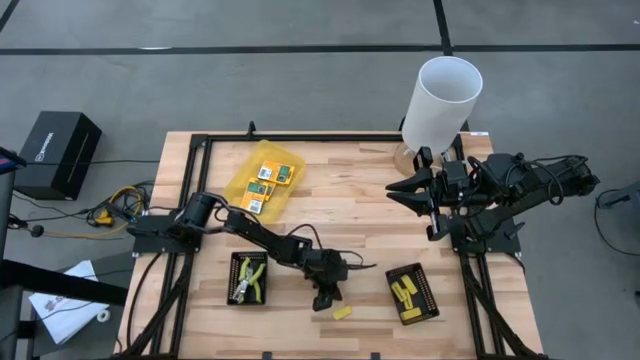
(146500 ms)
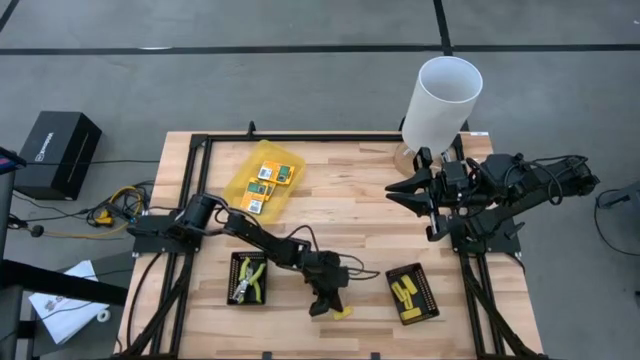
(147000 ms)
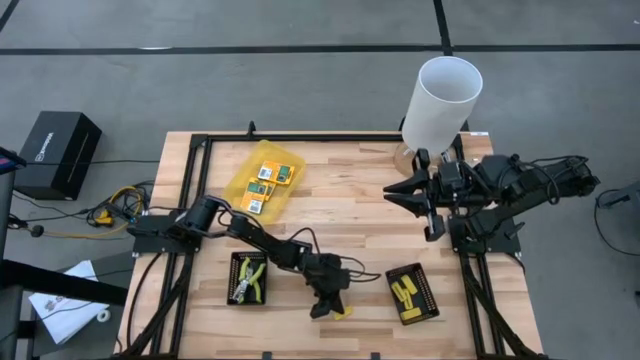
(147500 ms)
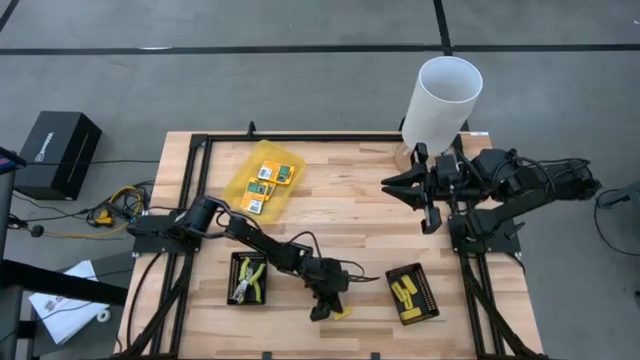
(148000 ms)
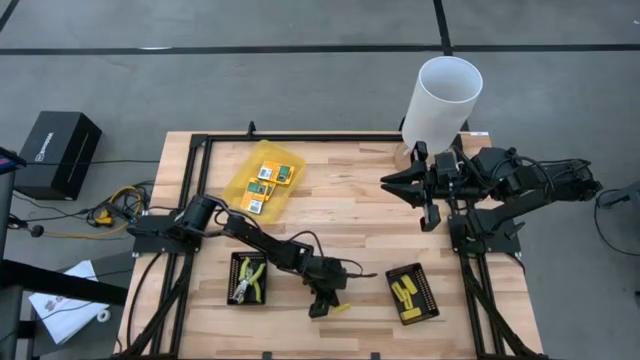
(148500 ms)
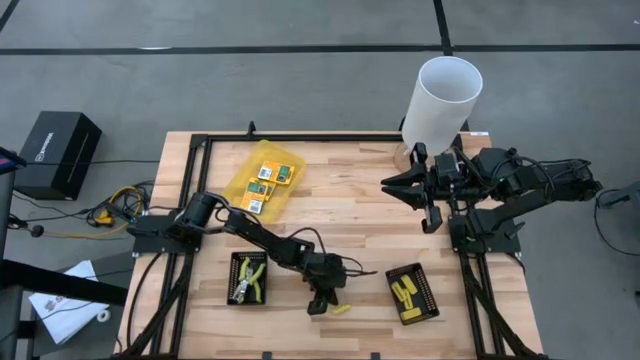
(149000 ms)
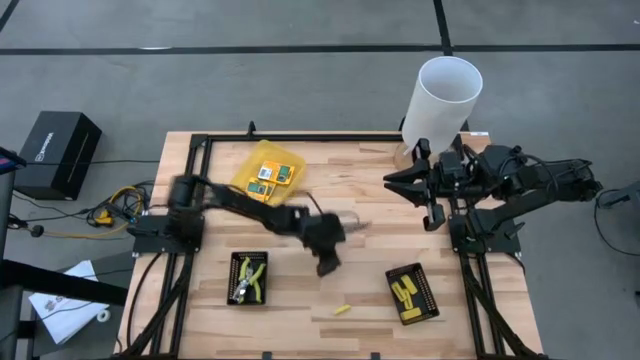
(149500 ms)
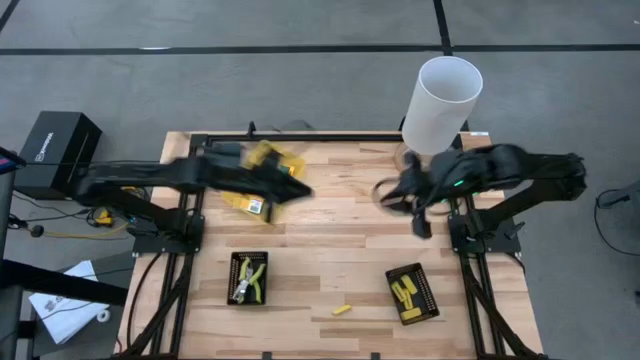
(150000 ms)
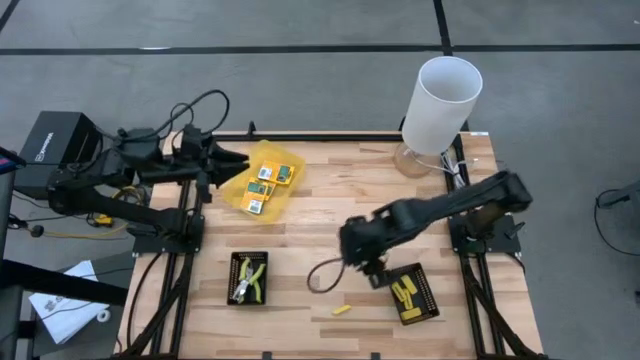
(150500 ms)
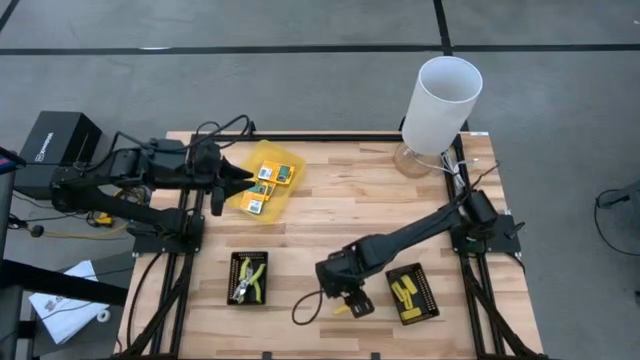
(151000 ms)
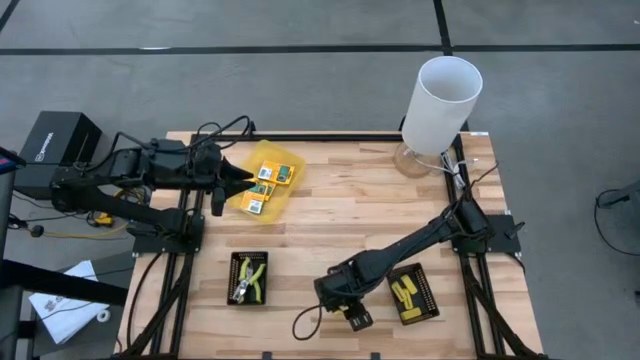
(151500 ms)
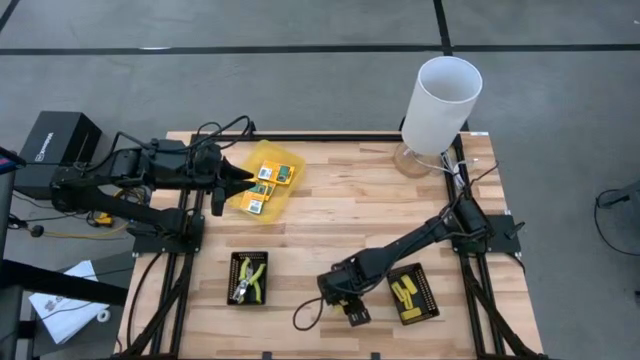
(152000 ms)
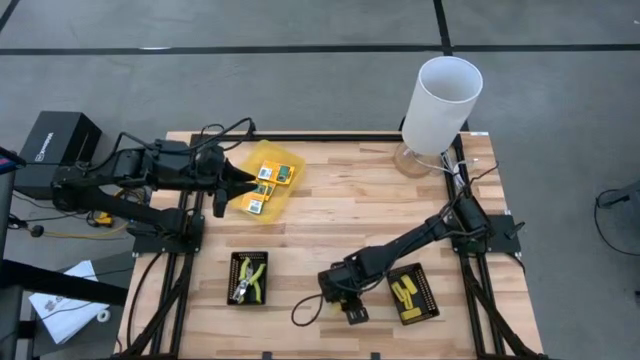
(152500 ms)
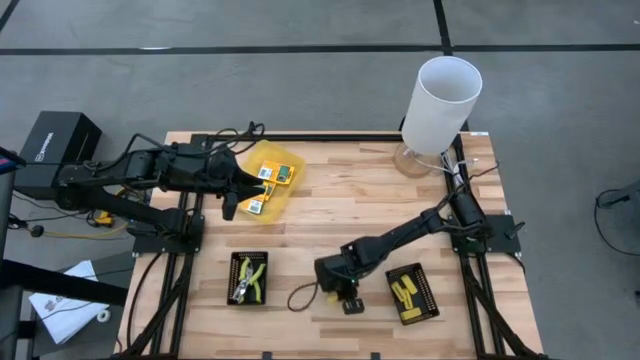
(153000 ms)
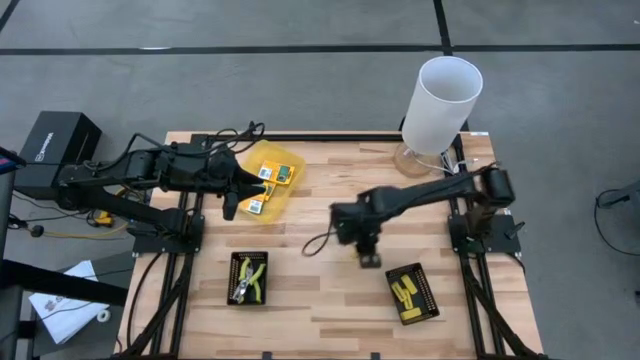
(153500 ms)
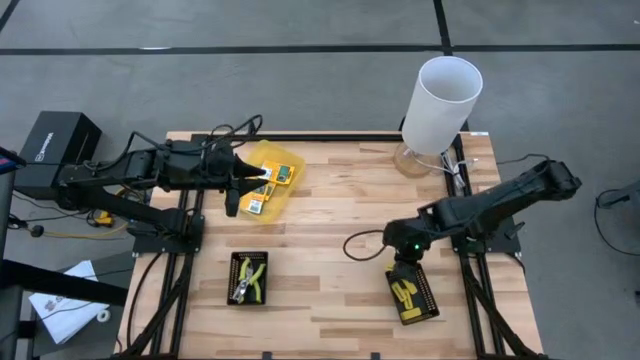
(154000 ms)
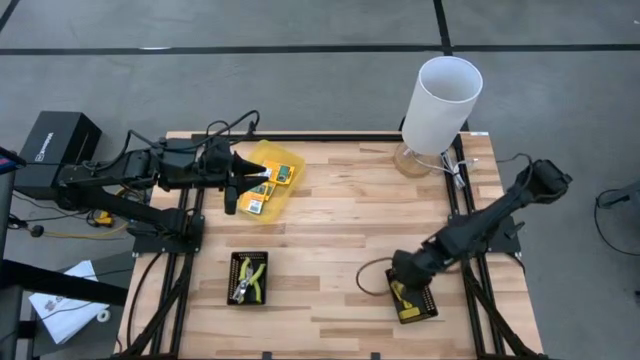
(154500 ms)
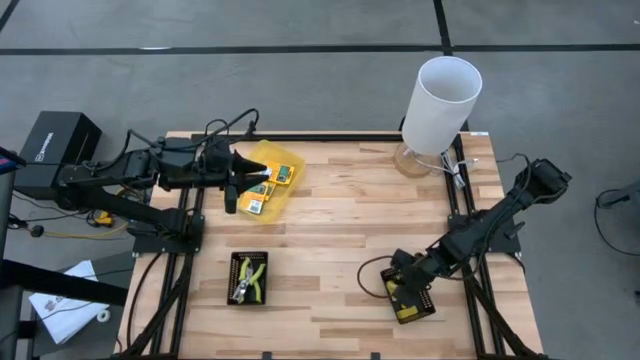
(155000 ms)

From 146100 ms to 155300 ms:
Task: Pick & Place School Supplies
Put the yellow eraser into the right black bin

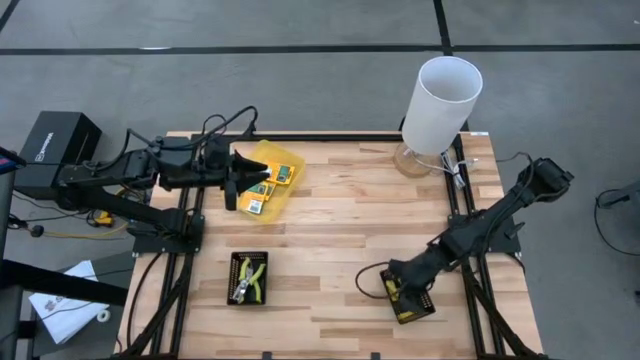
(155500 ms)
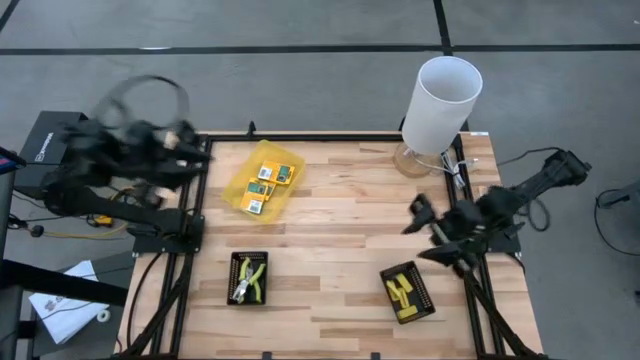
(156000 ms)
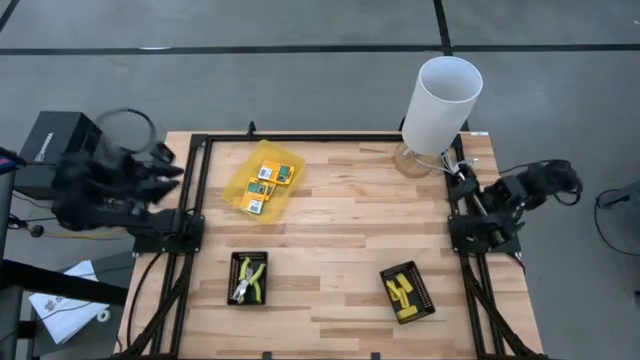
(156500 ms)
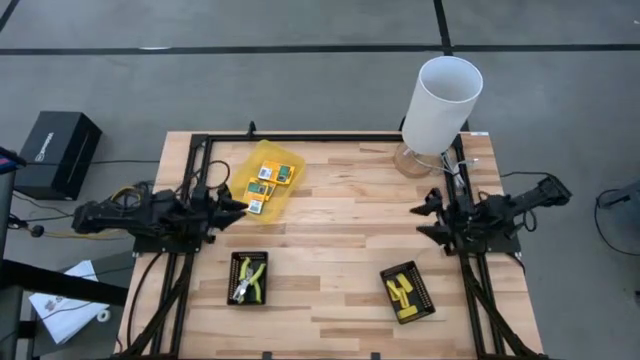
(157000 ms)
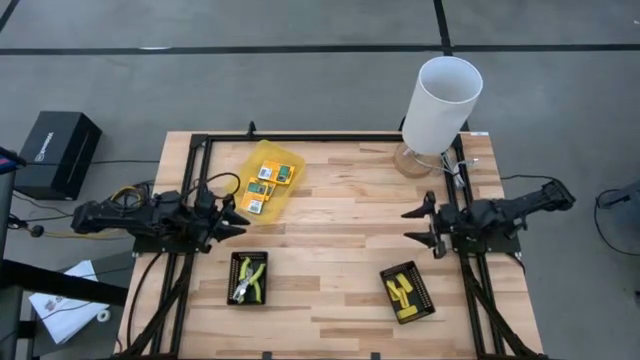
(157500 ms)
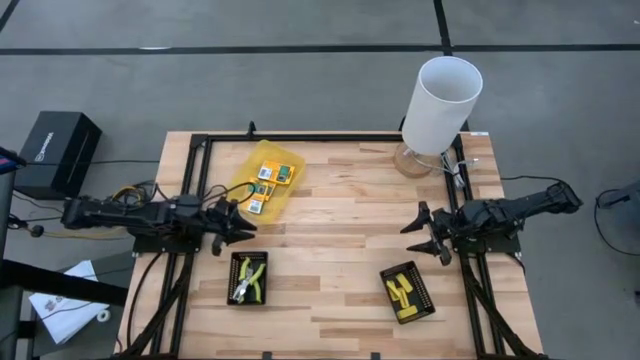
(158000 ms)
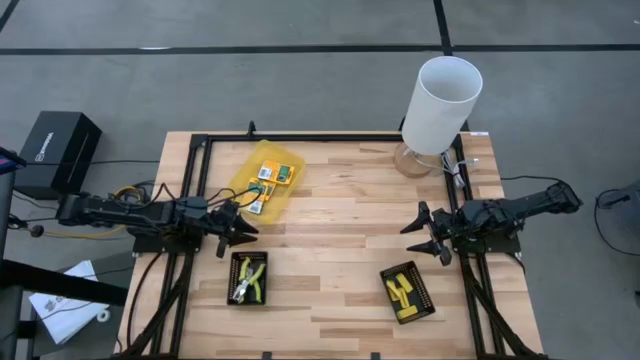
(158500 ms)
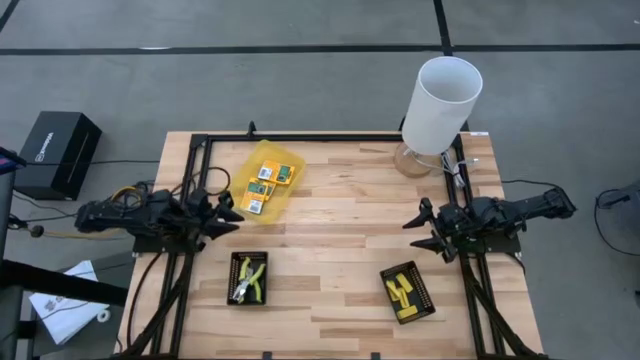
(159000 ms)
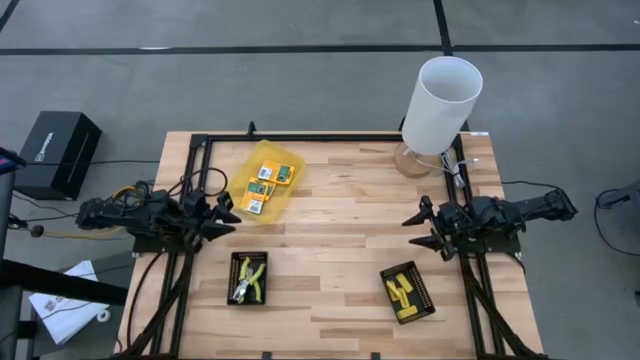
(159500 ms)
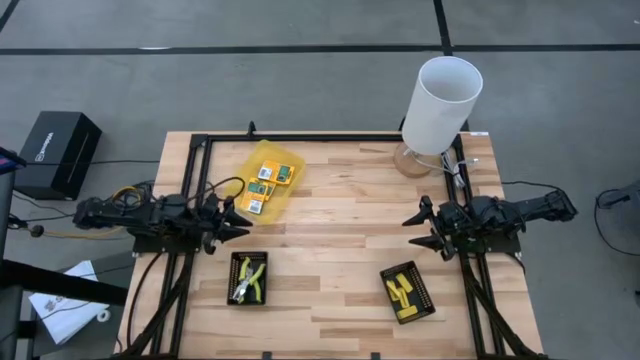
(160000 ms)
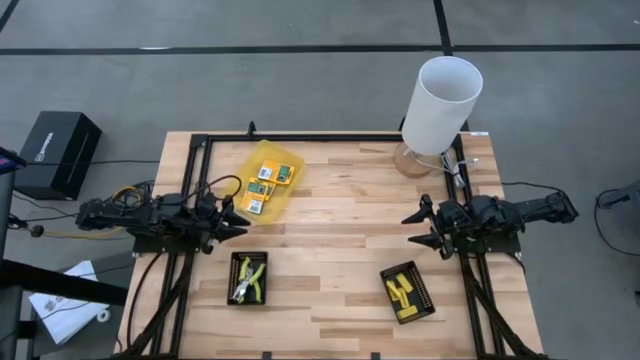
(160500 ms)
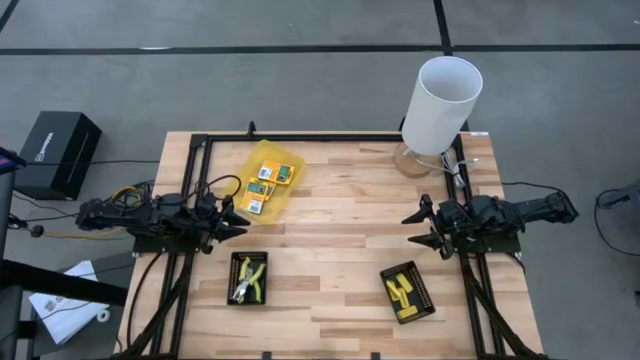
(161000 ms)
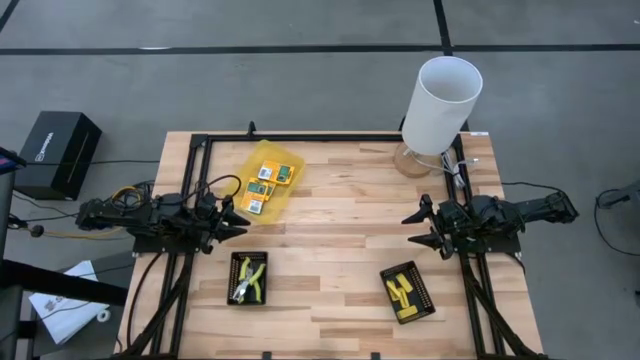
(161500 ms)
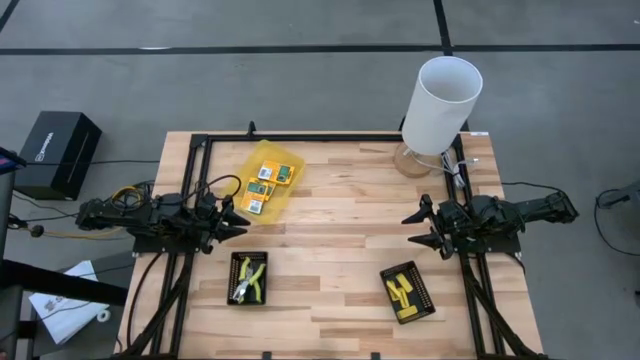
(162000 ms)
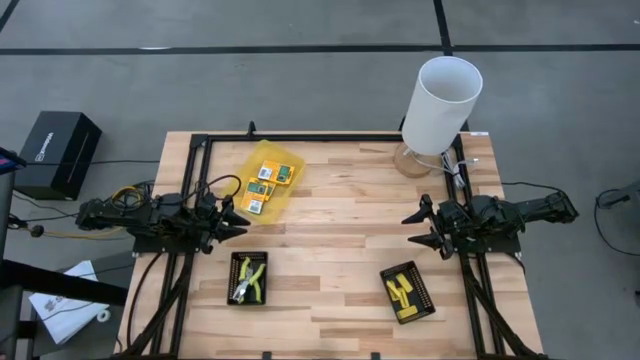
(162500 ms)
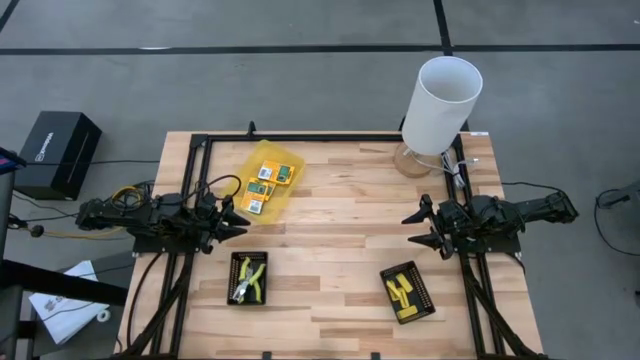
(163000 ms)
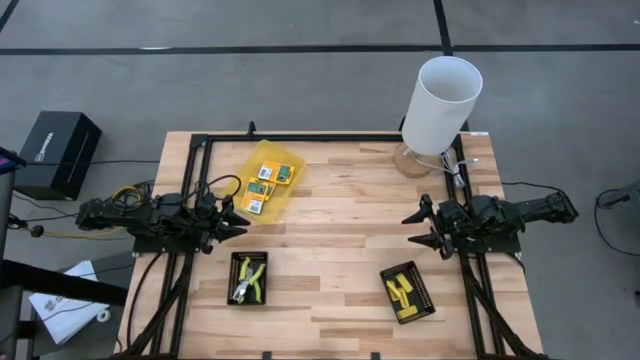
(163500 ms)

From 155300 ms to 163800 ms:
Return to Home Position

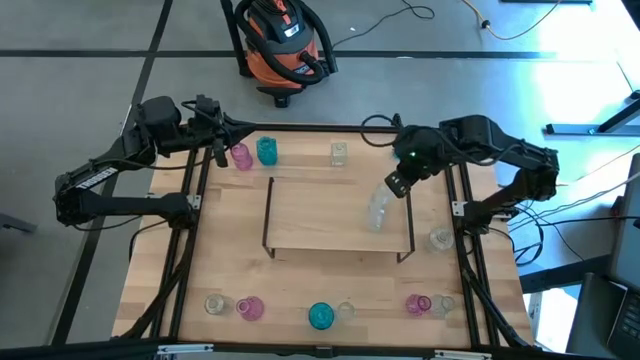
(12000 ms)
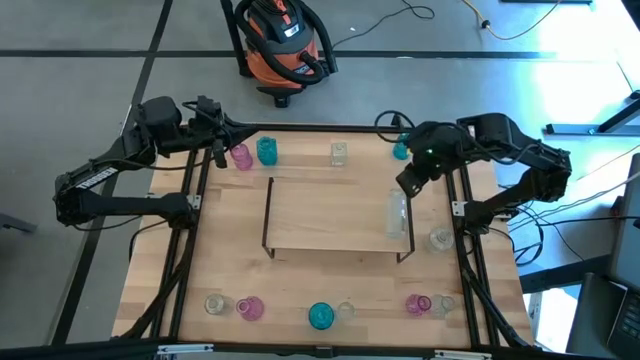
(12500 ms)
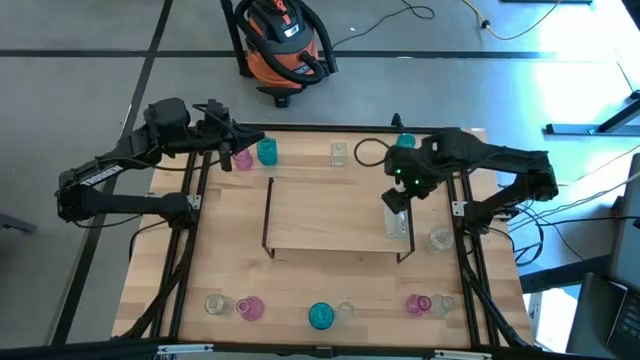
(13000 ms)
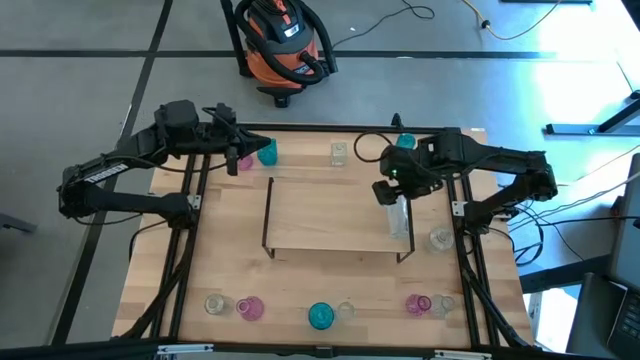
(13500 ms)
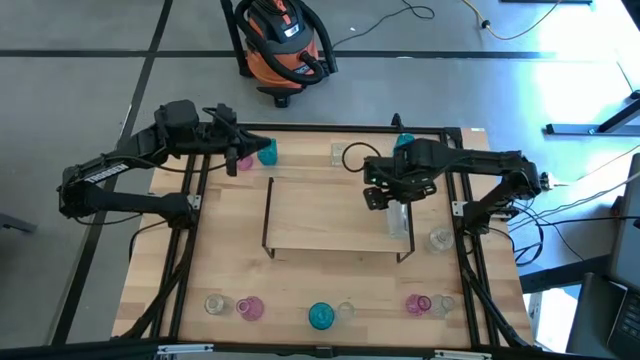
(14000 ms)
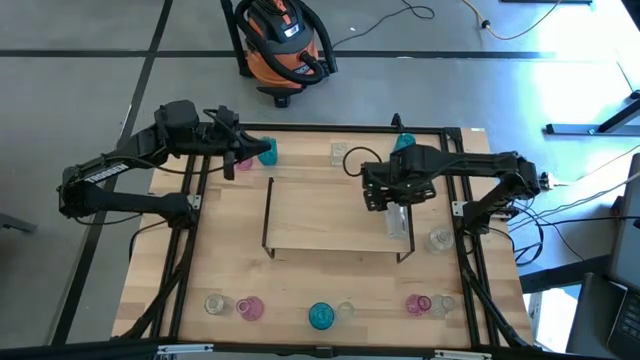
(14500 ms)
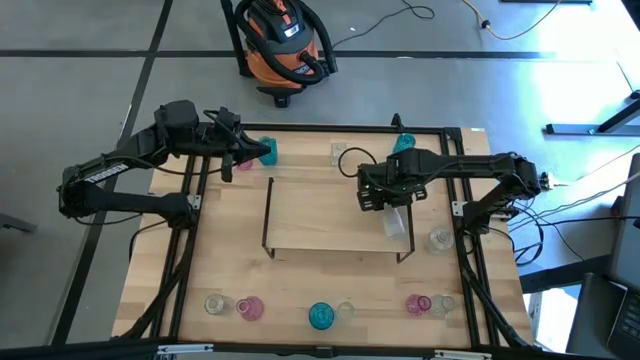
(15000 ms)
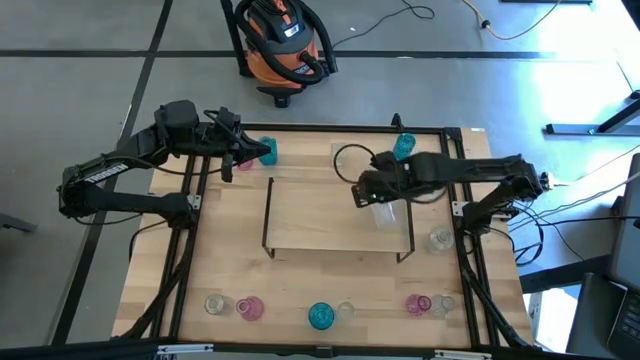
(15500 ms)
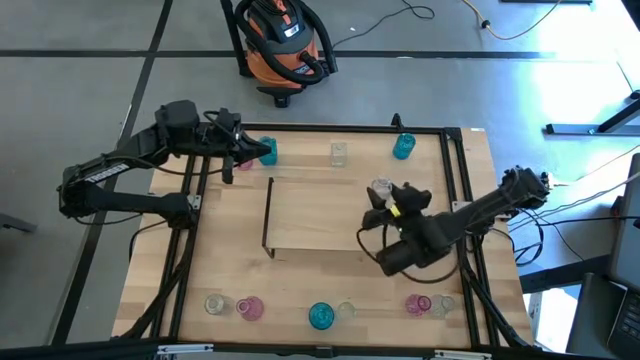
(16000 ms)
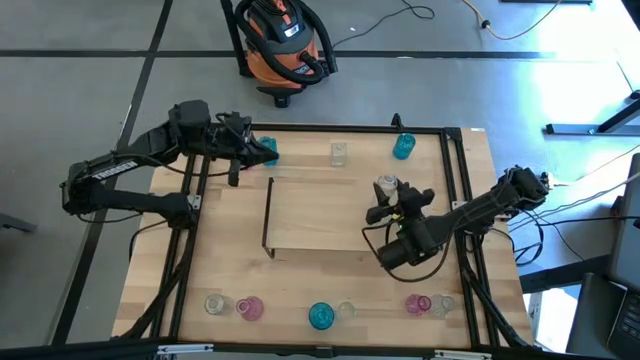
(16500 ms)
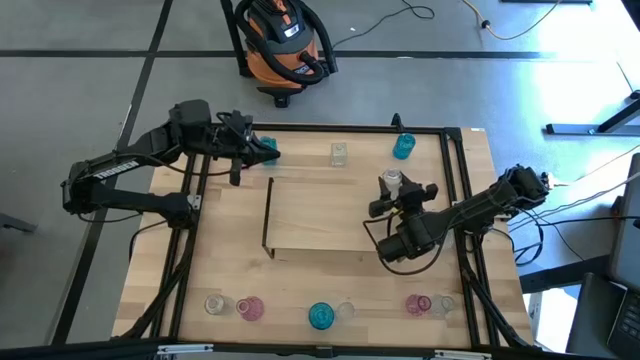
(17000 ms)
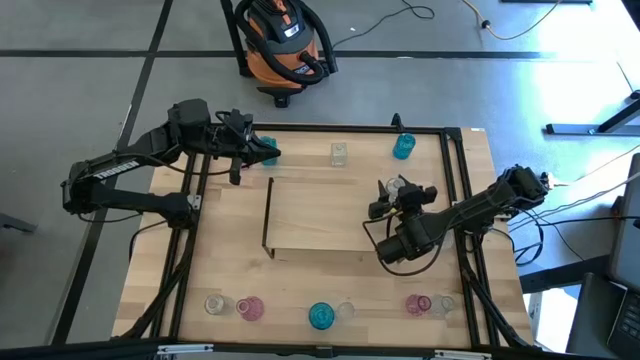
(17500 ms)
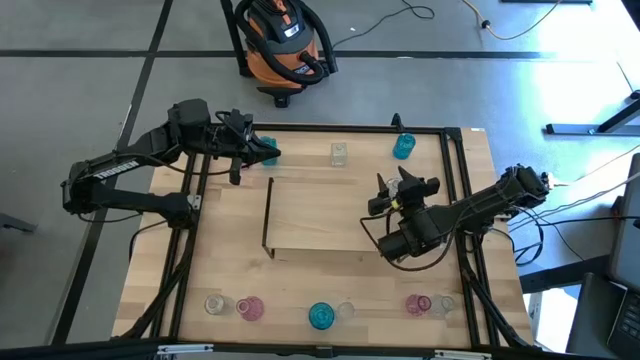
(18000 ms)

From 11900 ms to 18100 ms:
Task: sort vases onto shelf
Put the transparent vase on the shelf
